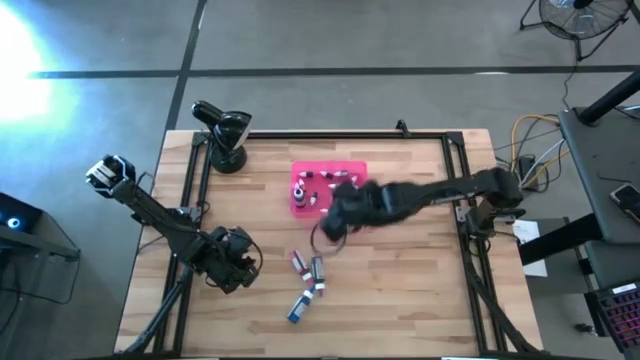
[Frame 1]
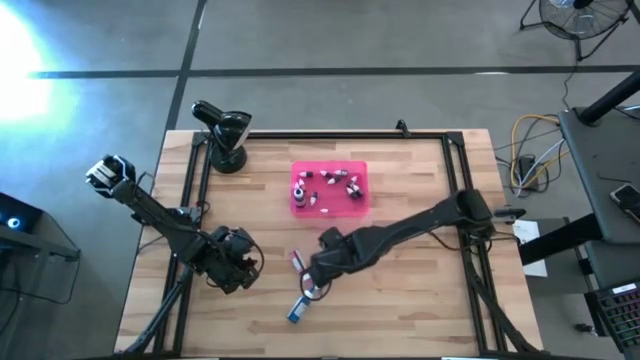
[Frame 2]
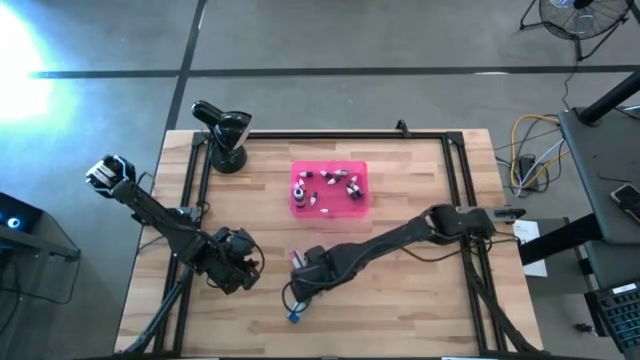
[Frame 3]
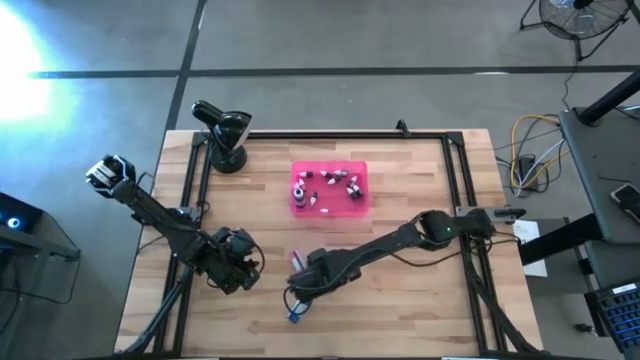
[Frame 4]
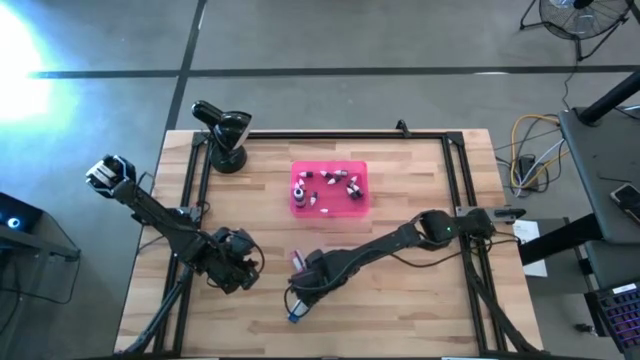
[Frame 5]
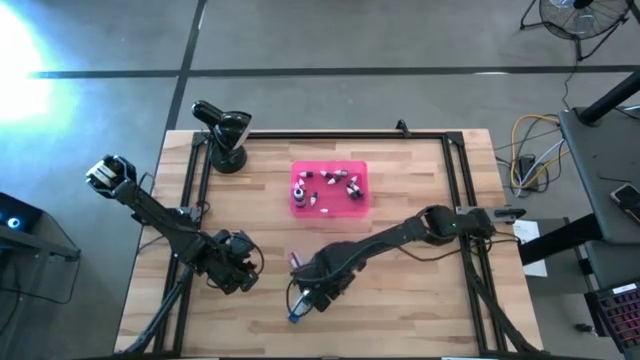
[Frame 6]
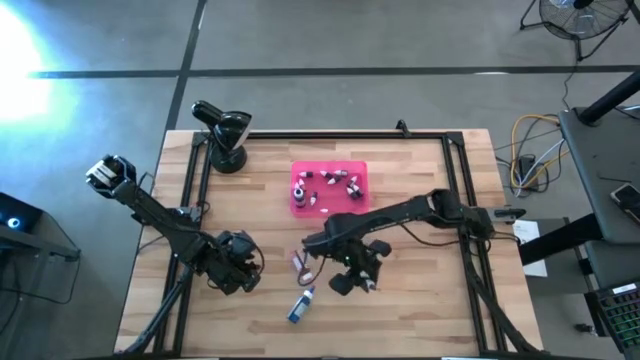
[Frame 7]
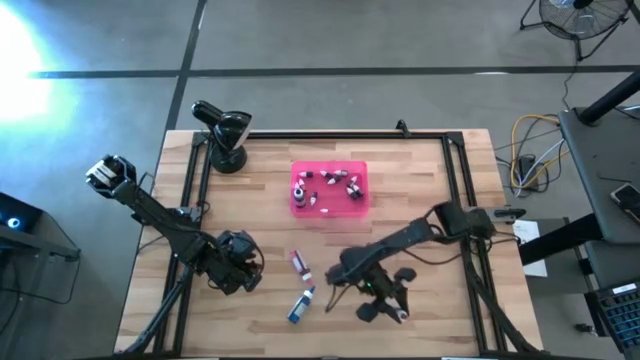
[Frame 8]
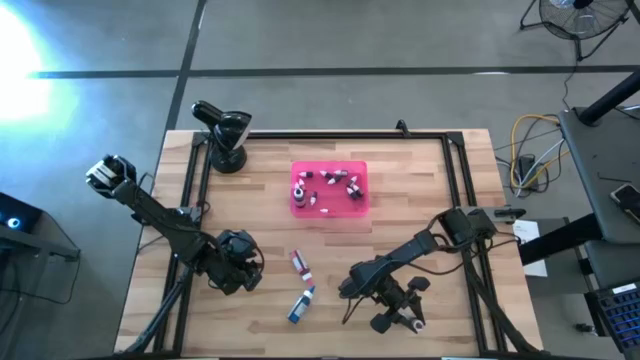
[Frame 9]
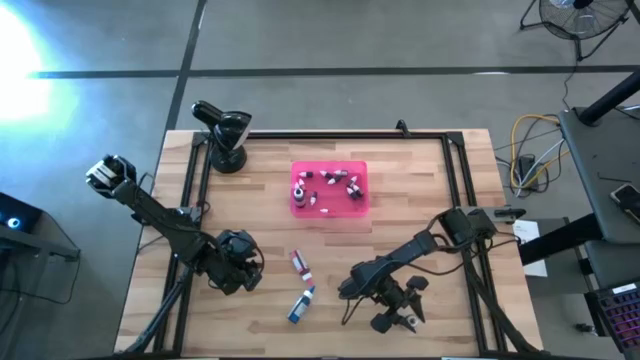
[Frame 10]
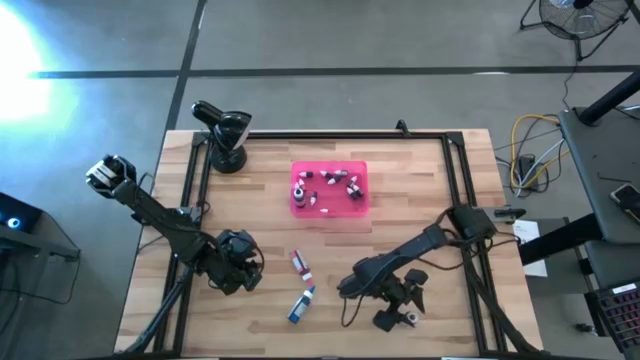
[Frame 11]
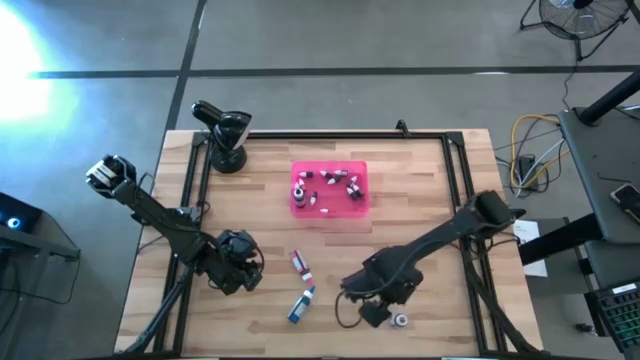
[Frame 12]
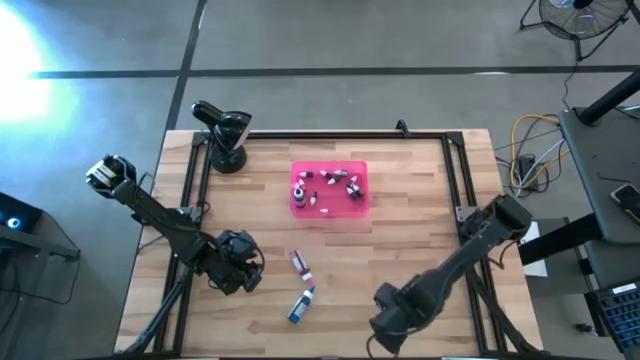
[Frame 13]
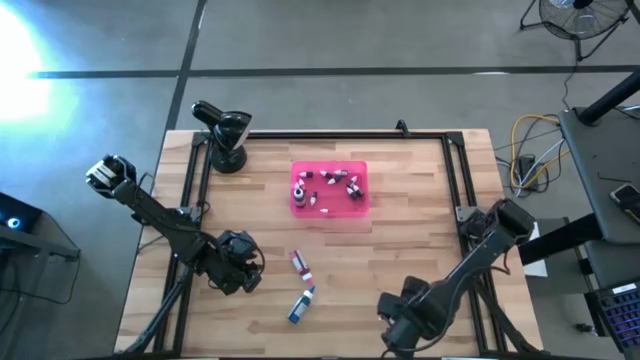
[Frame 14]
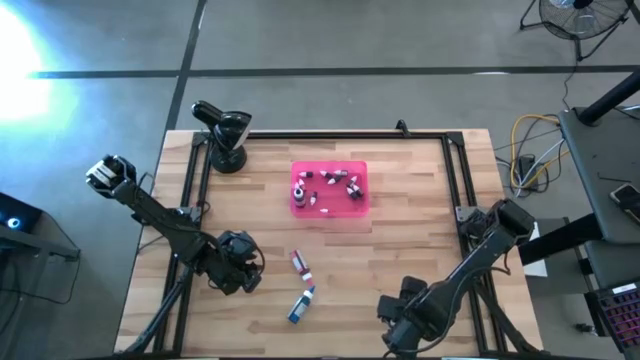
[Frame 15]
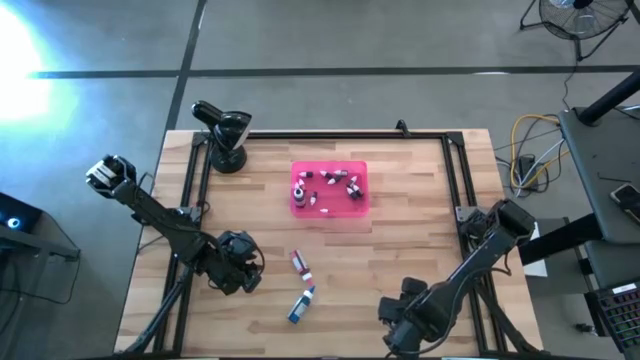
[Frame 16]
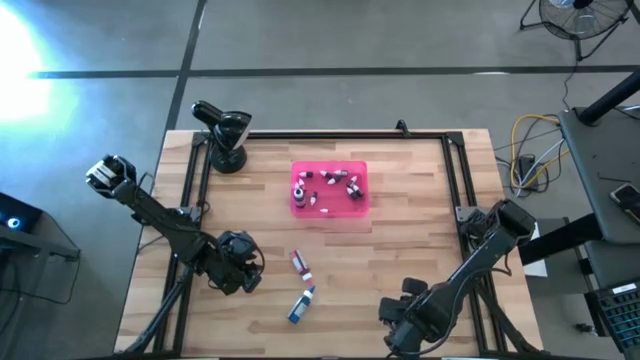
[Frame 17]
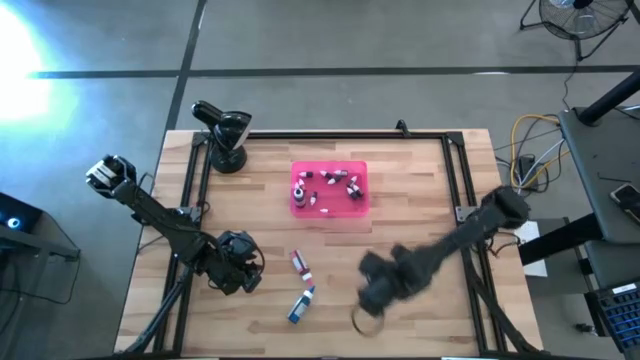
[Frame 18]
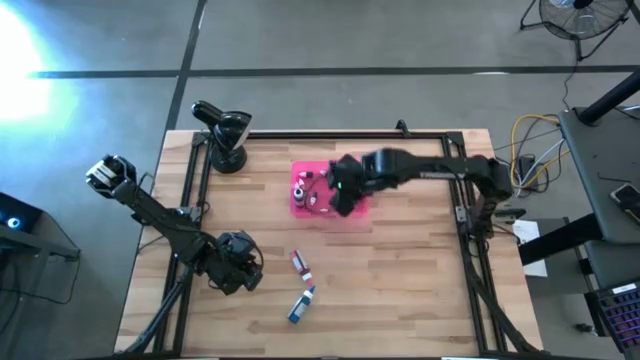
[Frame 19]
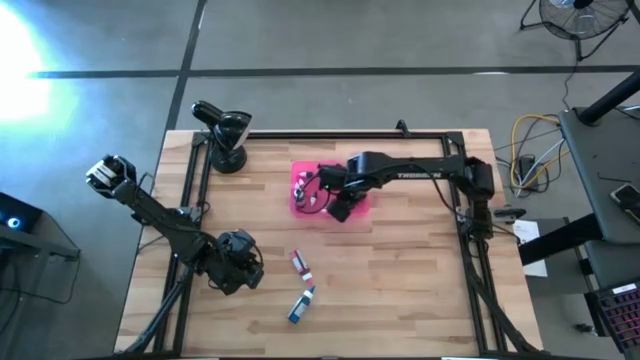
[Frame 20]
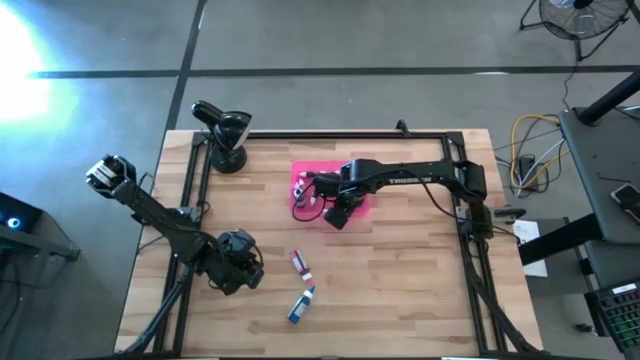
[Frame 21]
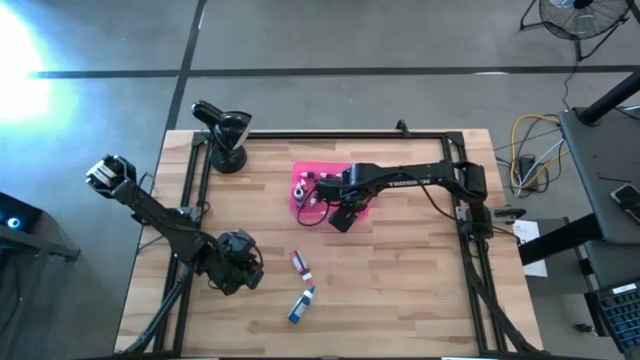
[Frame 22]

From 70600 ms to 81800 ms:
Task: Pick & Place food coloring
Put the purple food coloring bottle into the pink bin

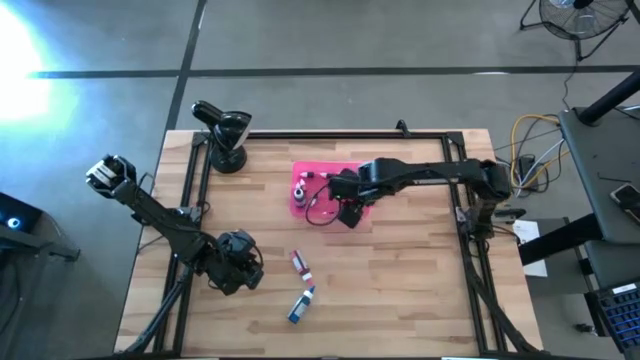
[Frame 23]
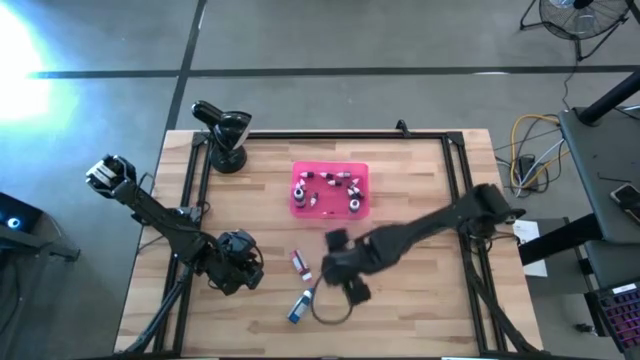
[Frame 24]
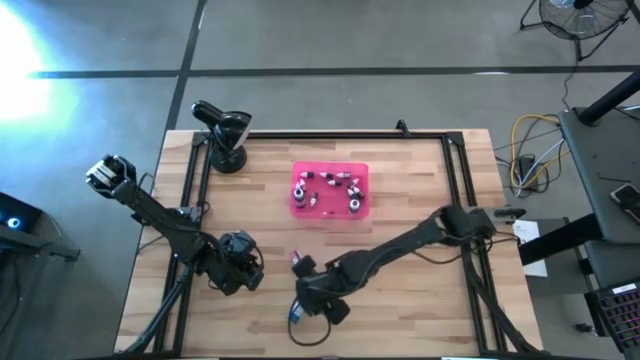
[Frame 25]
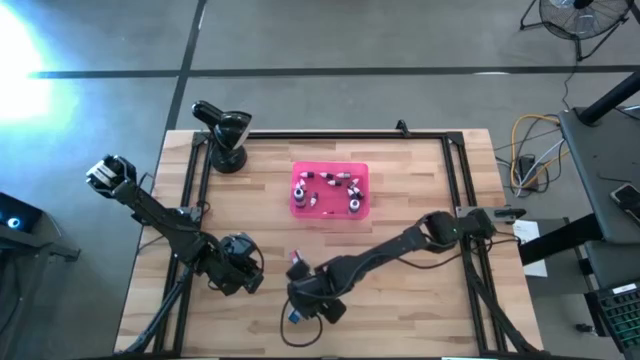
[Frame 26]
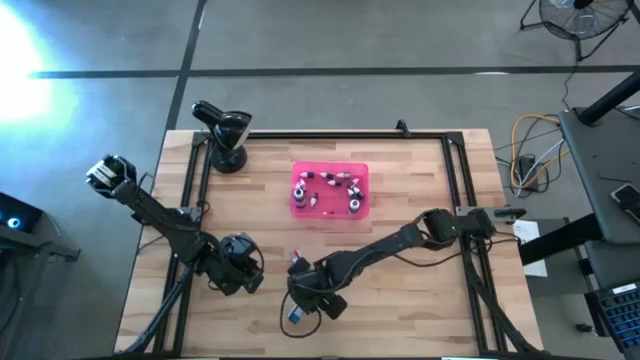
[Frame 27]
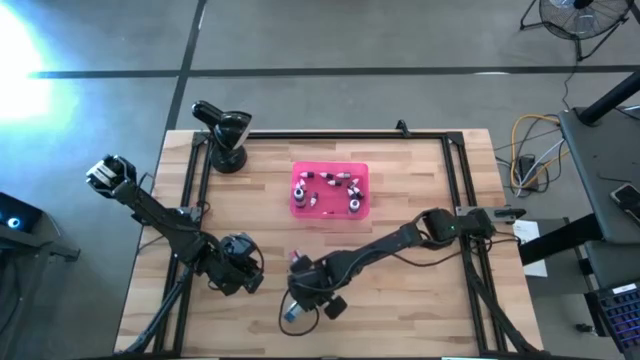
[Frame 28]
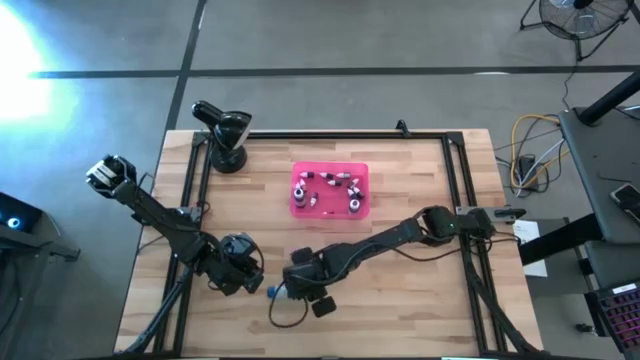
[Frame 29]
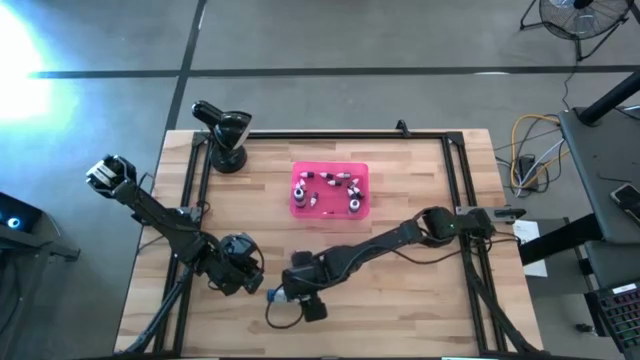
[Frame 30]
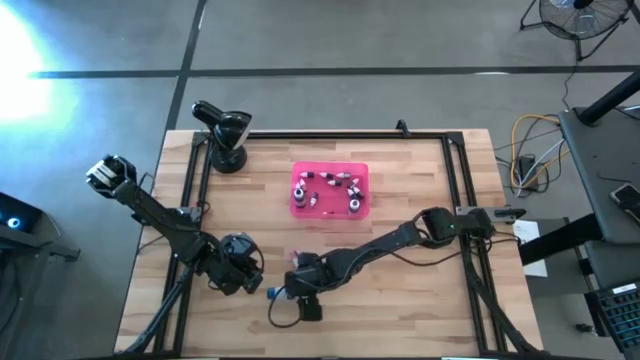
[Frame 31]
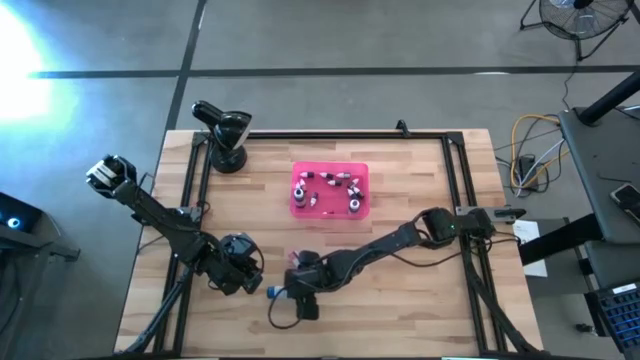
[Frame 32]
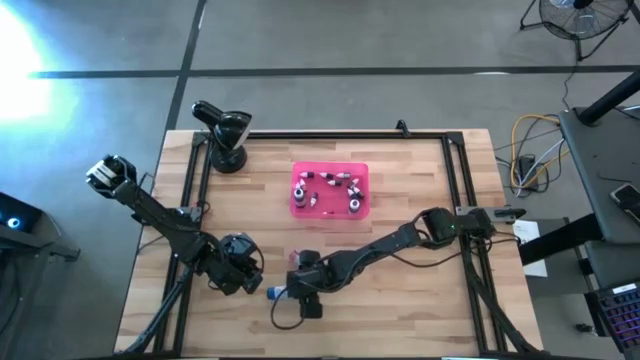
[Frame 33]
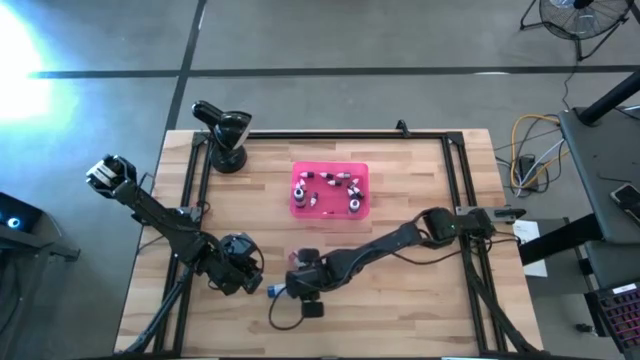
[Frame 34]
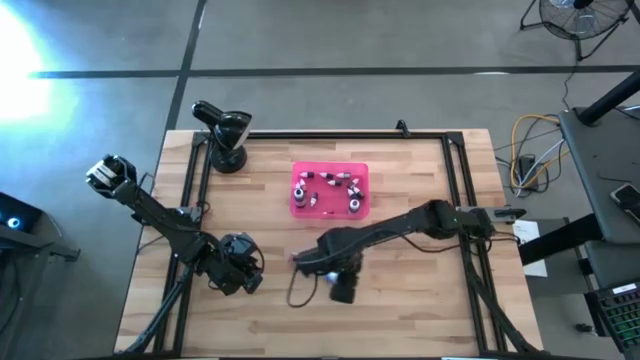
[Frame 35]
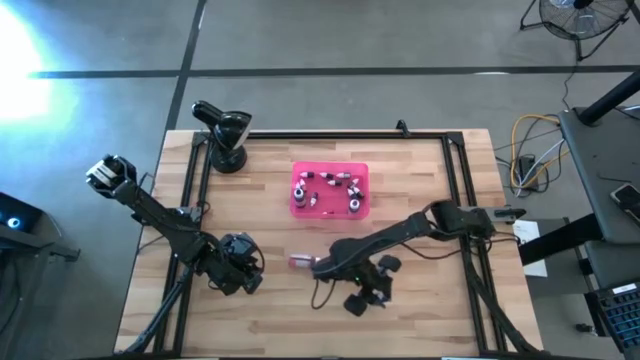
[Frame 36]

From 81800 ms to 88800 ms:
Put the blue food coloring bottle into the pink bin

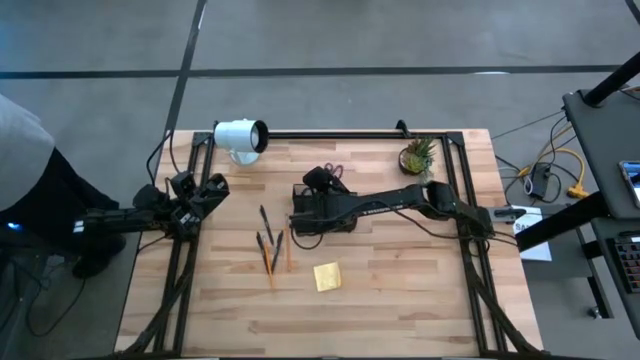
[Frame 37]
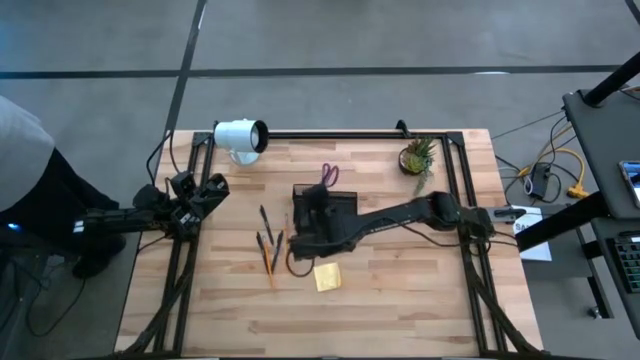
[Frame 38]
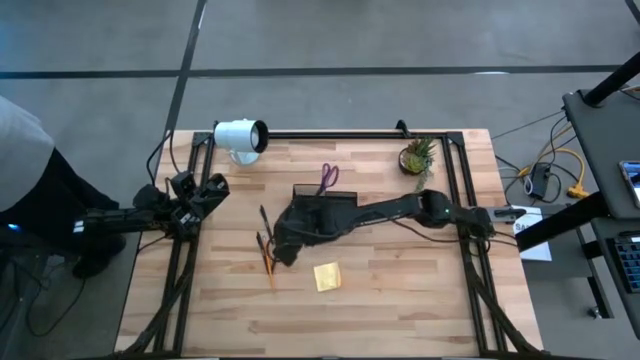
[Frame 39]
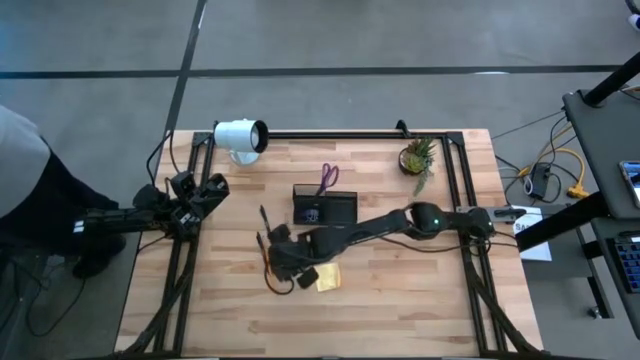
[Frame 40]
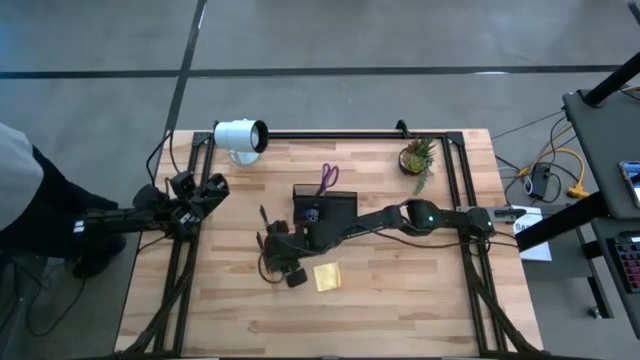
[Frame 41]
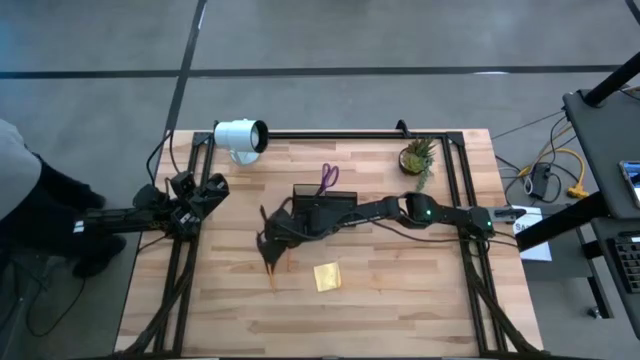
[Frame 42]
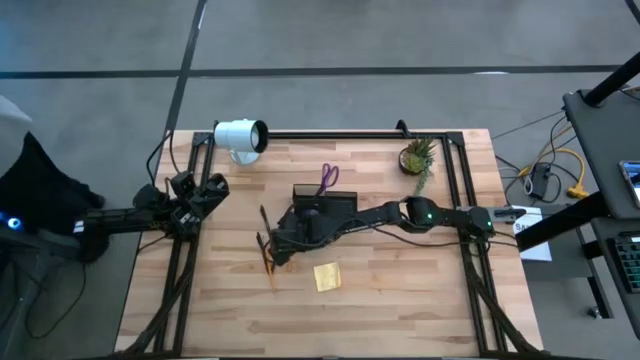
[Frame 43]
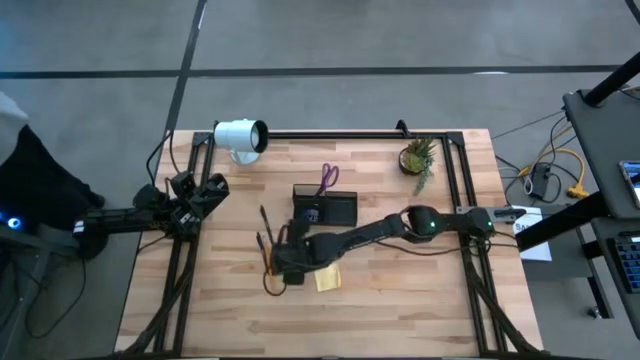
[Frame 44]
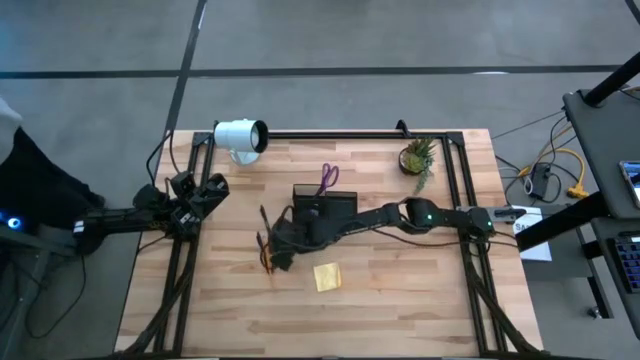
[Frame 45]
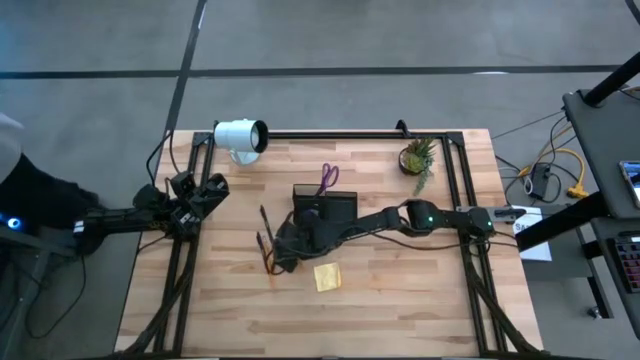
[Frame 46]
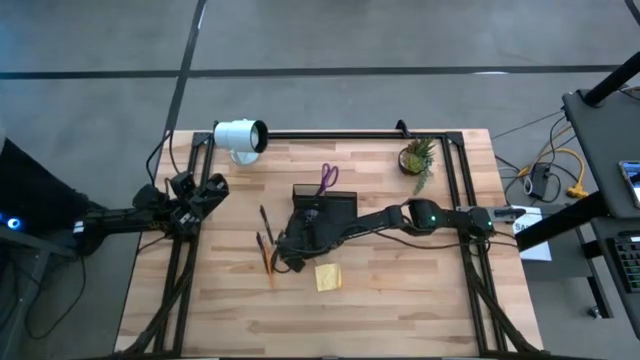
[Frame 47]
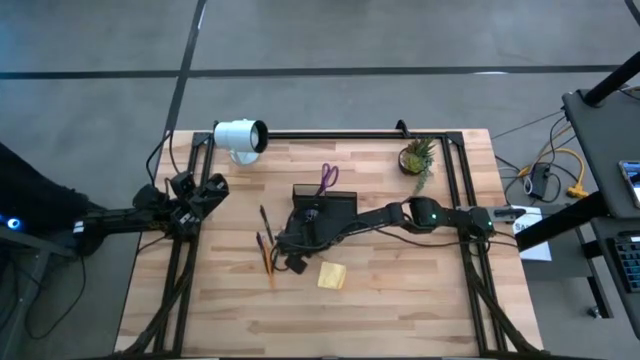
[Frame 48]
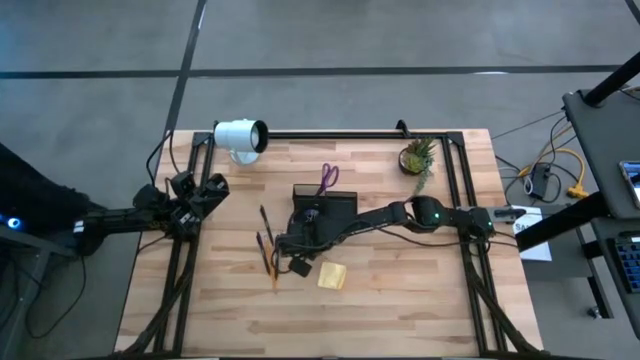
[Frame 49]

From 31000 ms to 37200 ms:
Task: Pick and place office supplies into organizer
Put the right orange pencil into the black desk organizer
